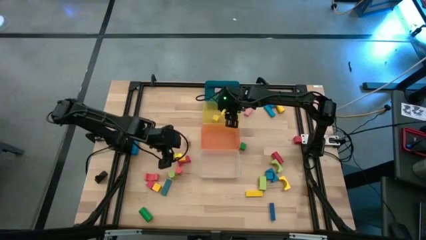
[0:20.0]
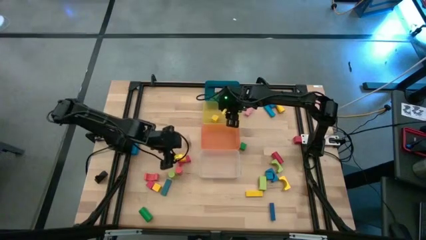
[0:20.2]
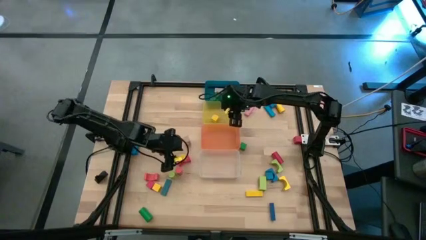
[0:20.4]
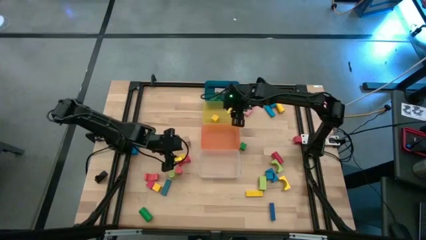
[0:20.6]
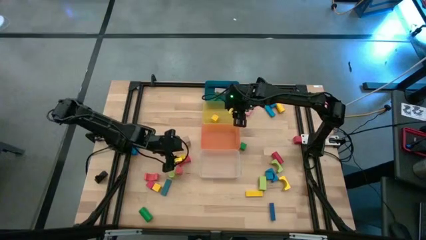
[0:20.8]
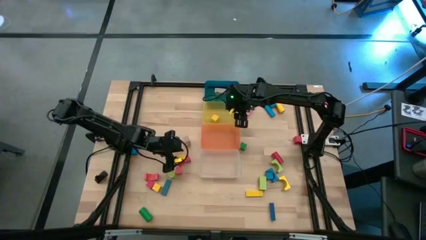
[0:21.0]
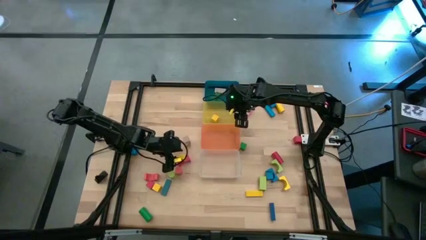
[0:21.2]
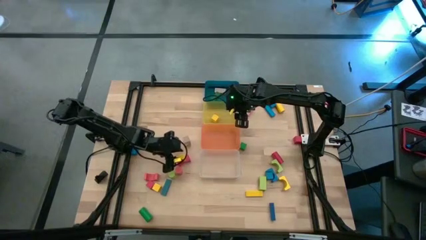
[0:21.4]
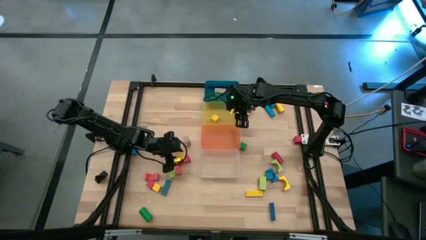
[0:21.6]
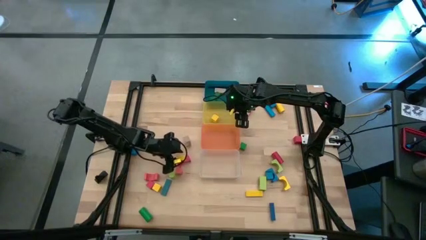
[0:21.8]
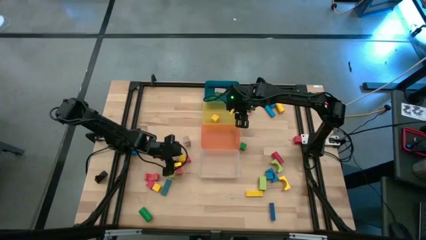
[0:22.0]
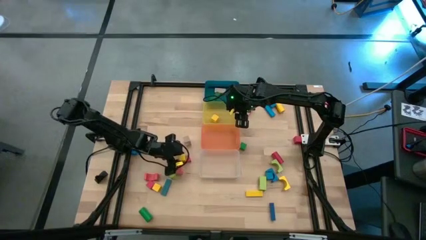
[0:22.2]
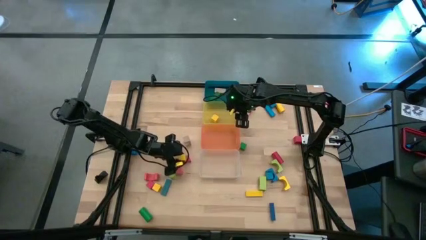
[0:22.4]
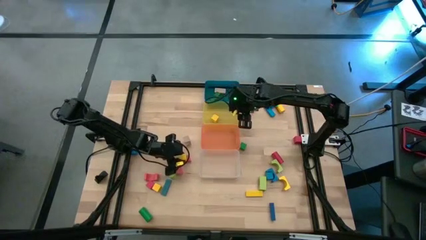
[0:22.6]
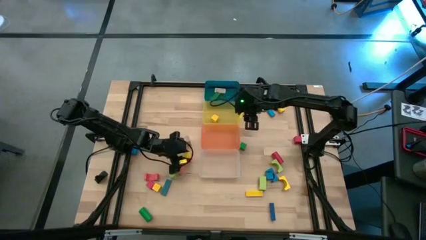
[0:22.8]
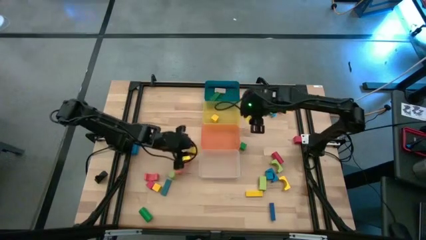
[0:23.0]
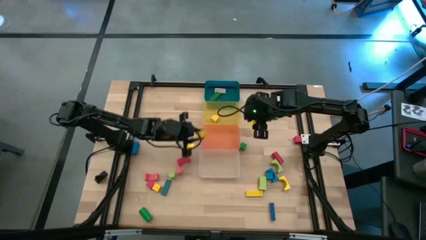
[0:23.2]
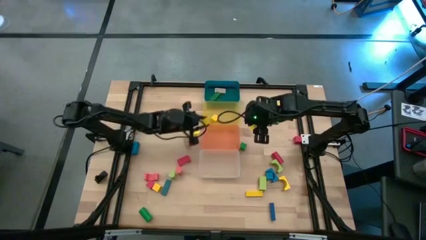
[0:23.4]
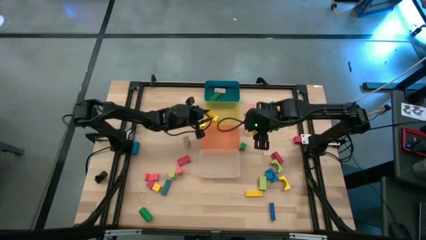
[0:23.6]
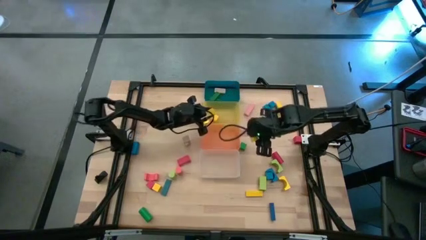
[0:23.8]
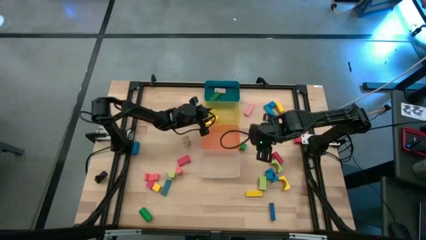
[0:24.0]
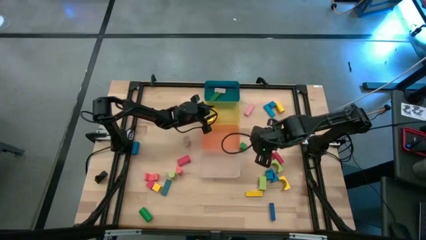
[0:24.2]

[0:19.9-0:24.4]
Task: Sort blocks by size
Put the yellow square block into the yellow bin

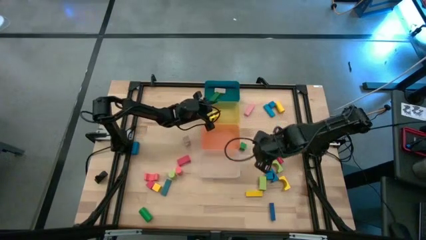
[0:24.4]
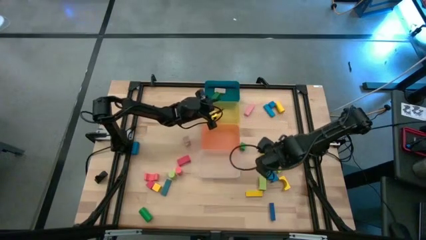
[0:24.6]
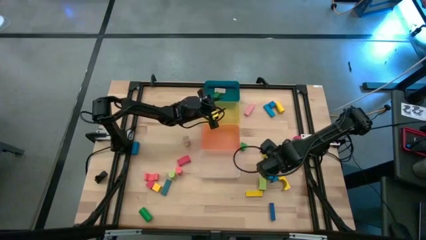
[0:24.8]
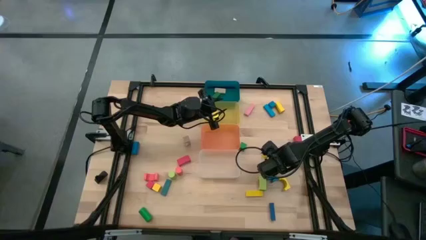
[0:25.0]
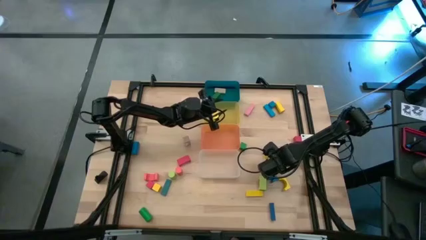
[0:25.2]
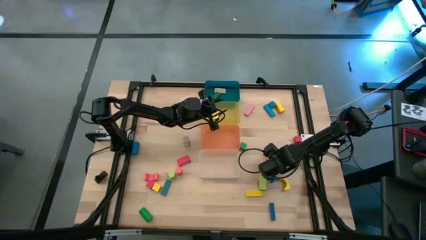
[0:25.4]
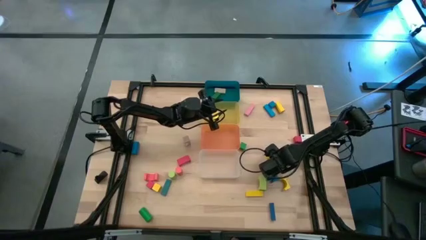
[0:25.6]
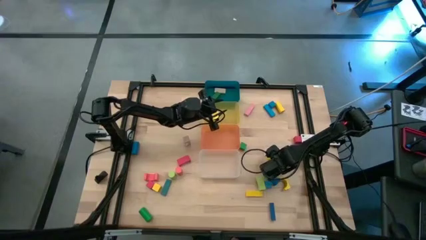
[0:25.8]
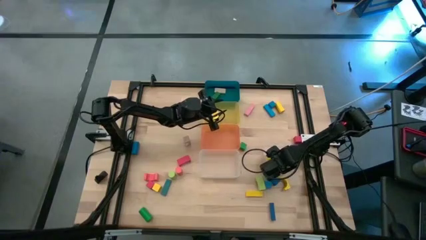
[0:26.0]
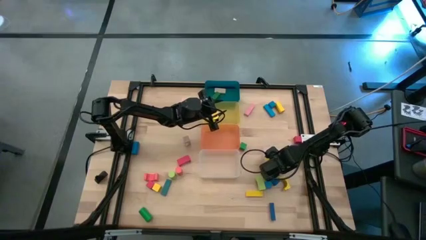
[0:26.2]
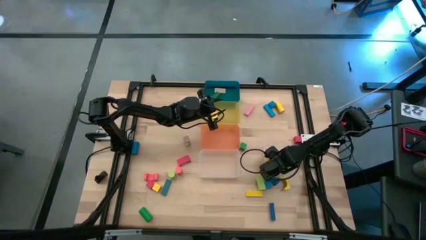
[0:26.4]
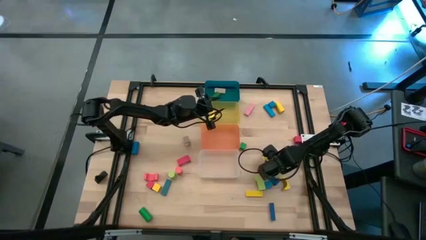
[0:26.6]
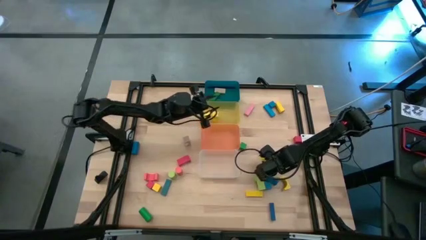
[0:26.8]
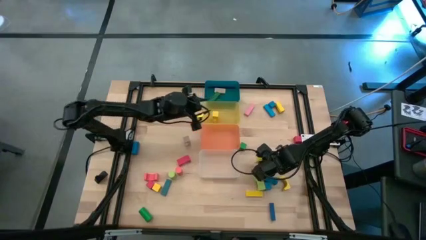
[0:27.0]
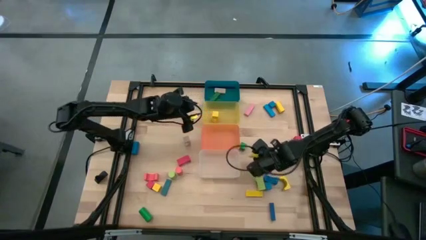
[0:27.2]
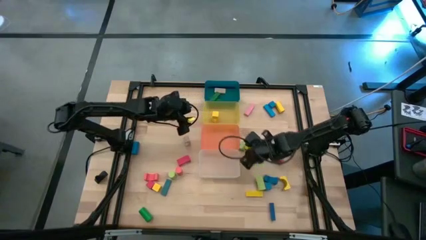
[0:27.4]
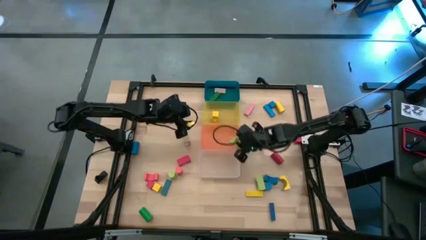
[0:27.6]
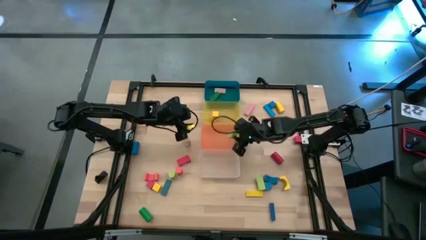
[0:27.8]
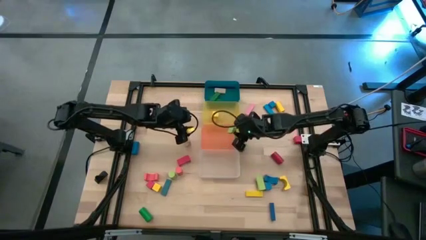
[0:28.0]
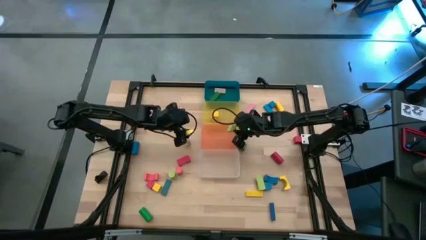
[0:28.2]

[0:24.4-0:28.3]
Put the light green arch block into the orange bin

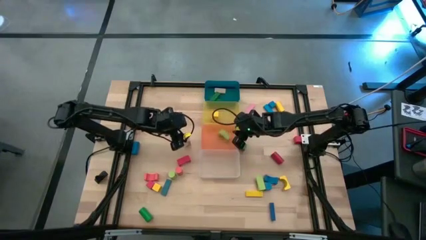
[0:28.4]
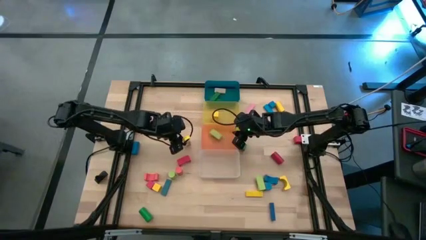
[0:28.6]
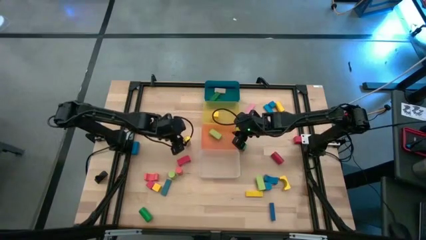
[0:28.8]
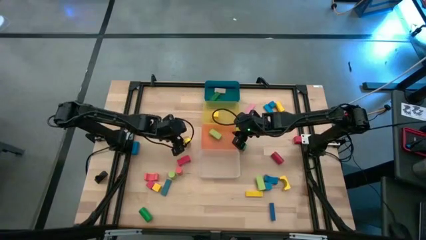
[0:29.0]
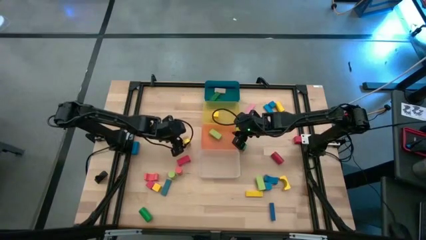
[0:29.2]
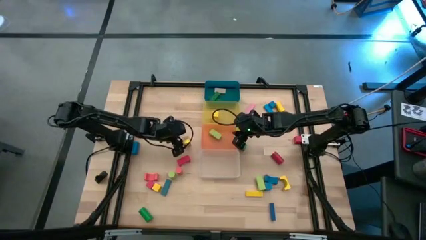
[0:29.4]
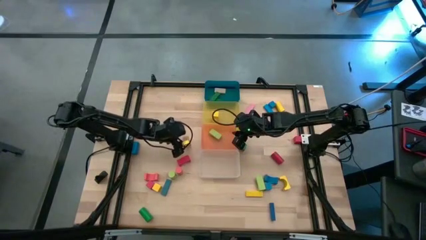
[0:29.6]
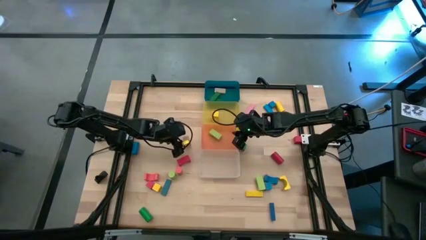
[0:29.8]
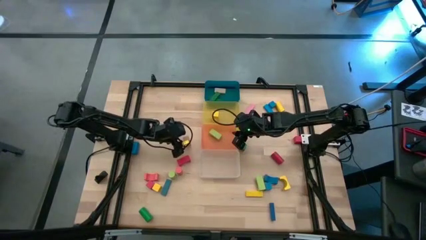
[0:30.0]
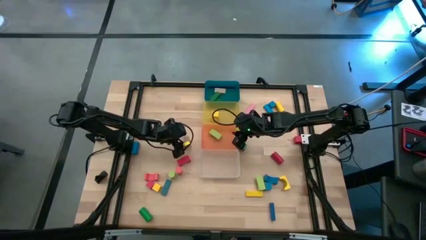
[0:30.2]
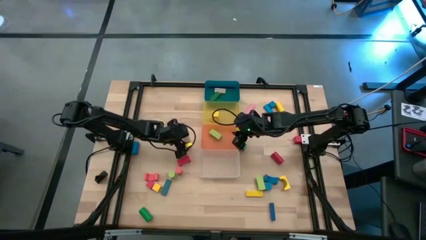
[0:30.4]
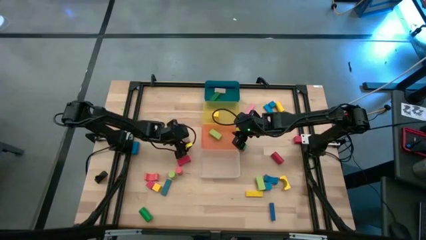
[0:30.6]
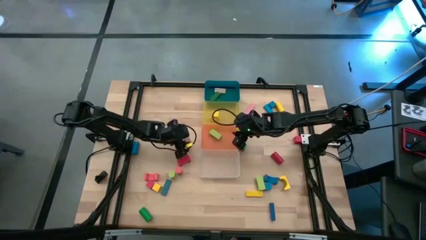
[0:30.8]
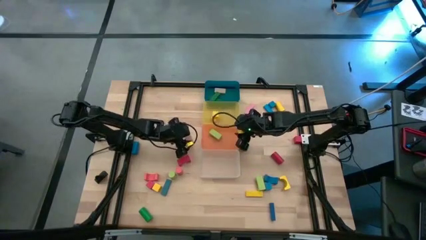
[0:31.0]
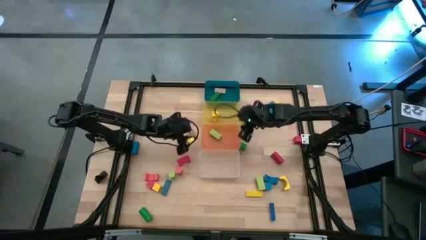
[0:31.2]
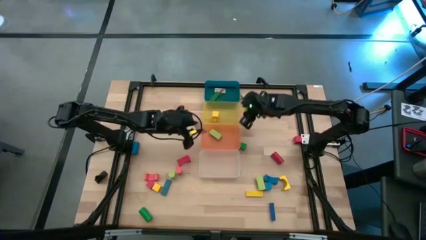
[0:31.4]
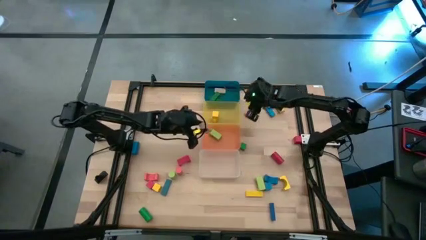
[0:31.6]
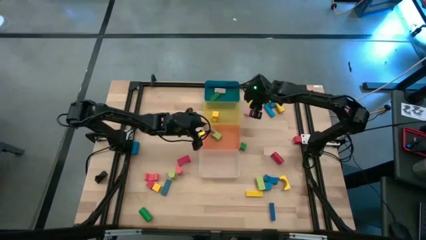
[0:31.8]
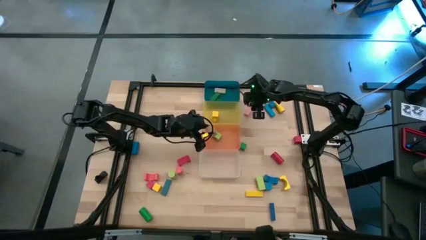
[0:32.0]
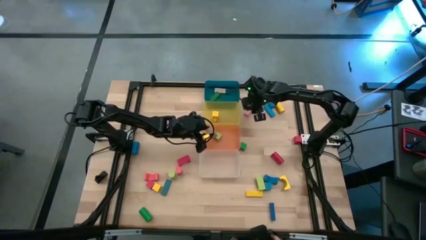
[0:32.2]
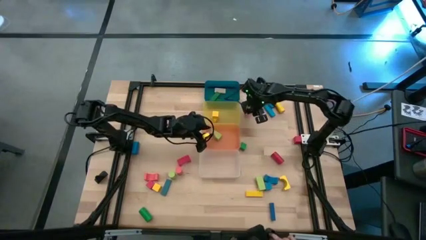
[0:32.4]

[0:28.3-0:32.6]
Put the brown arch block into the orange bin

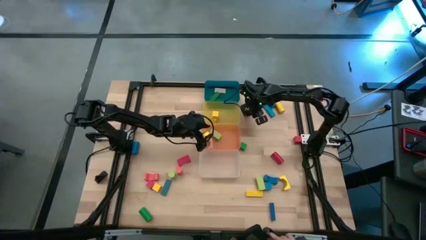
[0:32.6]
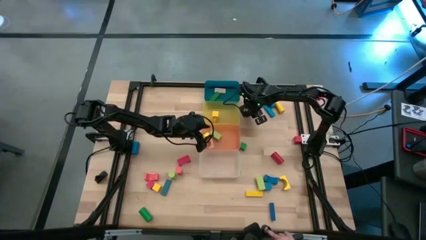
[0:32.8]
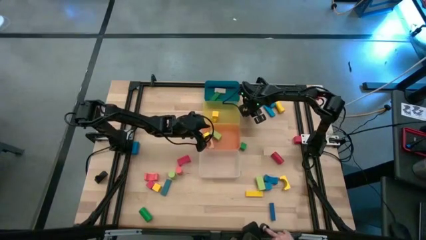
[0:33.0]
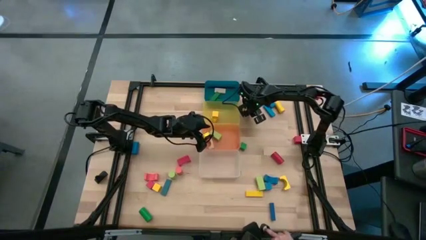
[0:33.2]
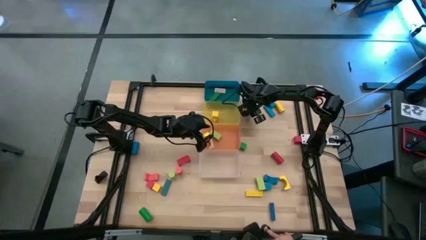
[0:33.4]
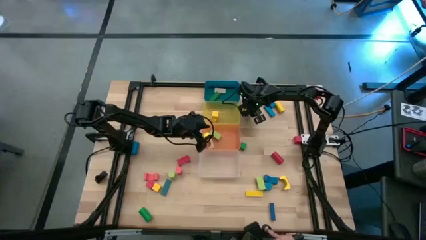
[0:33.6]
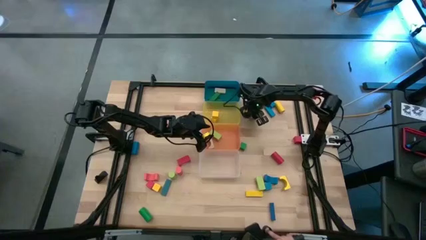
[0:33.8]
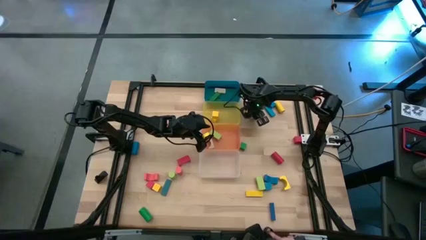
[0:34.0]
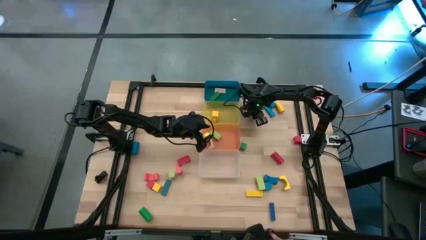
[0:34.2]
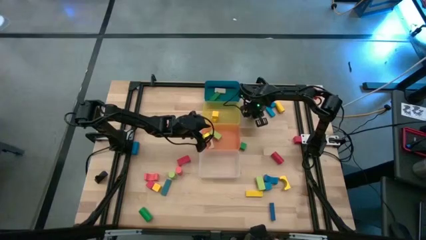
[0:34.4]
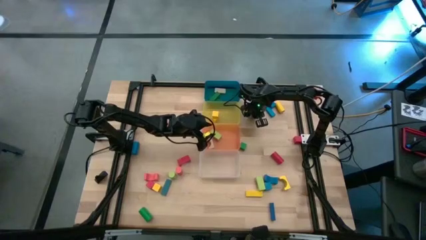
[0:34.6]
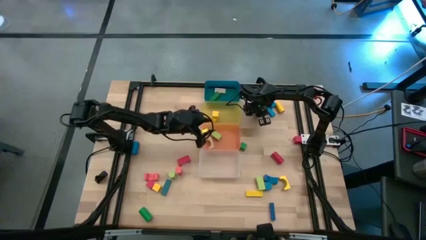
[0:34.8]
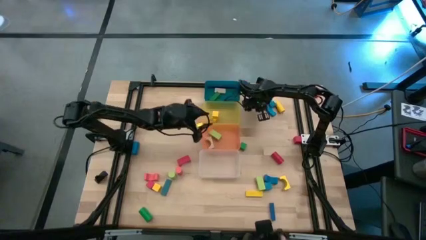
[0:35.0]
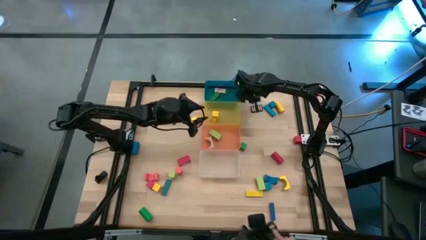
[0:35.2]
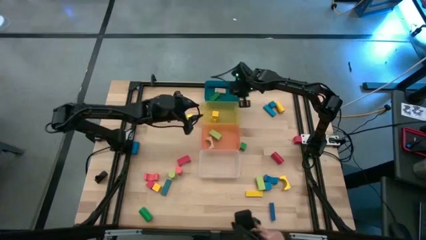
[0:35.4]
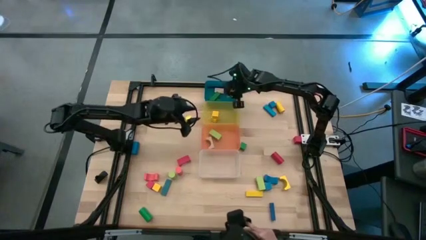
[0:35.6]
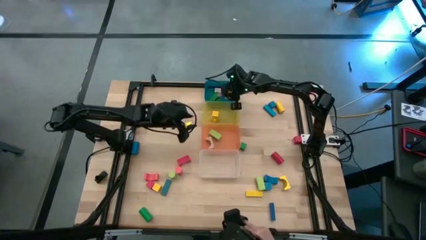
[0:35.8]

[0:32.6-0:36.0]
Put the pink rectangular block into the blue bin
